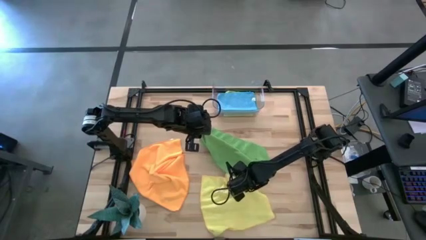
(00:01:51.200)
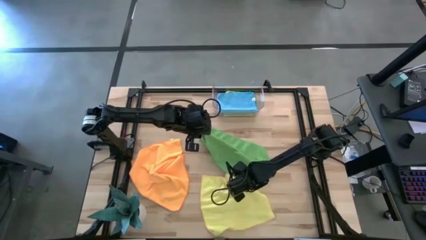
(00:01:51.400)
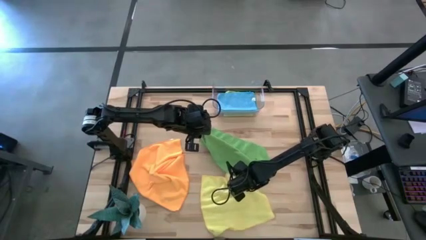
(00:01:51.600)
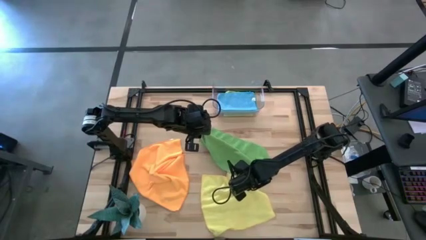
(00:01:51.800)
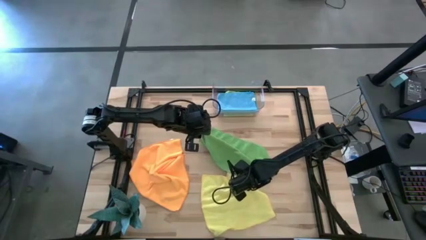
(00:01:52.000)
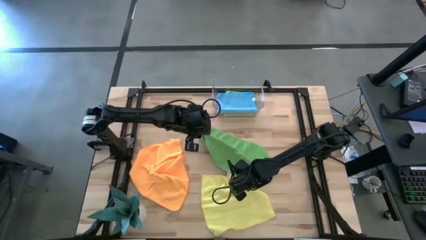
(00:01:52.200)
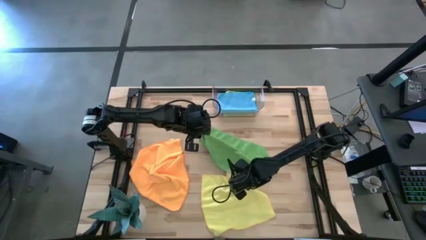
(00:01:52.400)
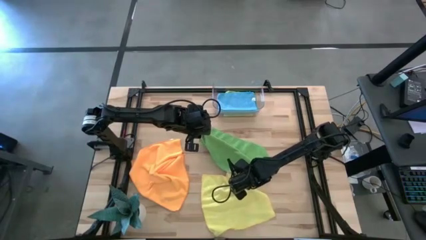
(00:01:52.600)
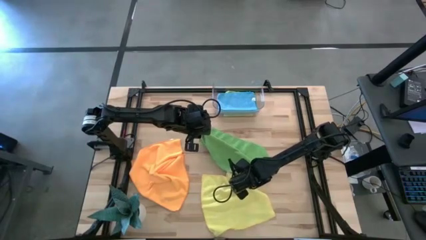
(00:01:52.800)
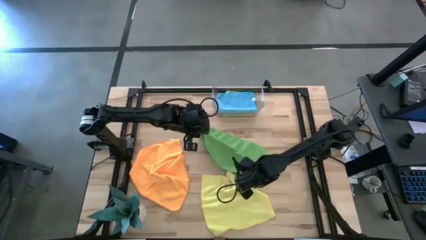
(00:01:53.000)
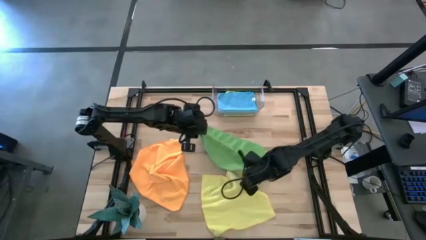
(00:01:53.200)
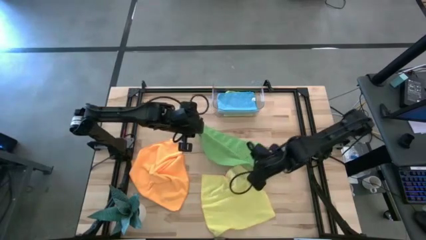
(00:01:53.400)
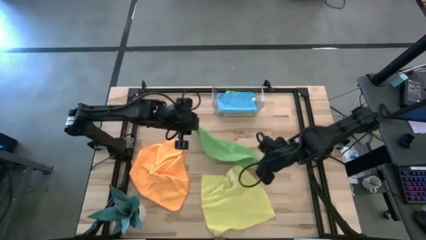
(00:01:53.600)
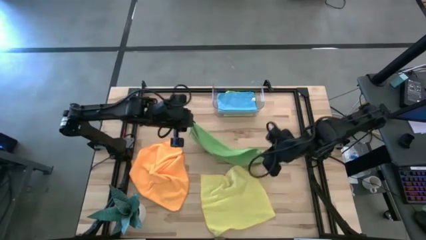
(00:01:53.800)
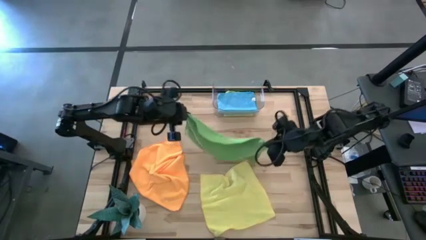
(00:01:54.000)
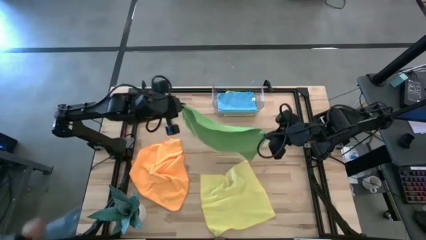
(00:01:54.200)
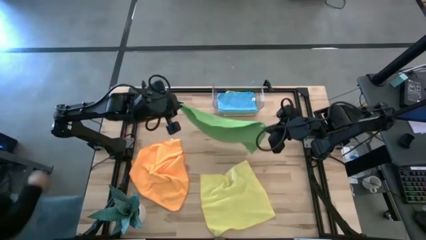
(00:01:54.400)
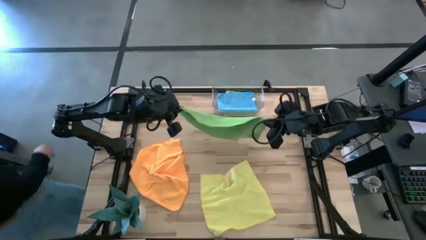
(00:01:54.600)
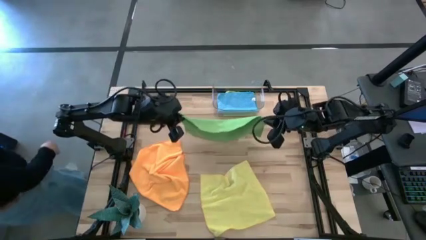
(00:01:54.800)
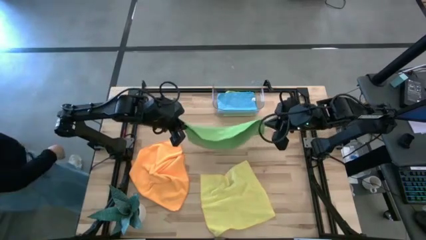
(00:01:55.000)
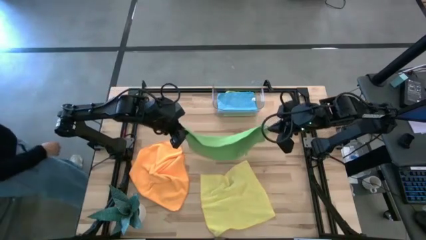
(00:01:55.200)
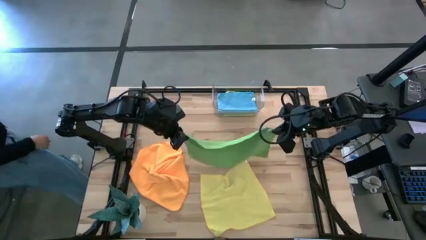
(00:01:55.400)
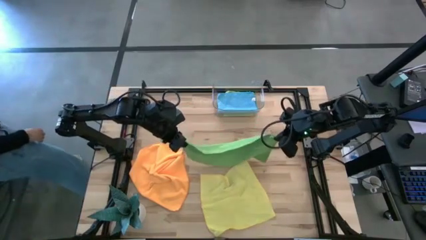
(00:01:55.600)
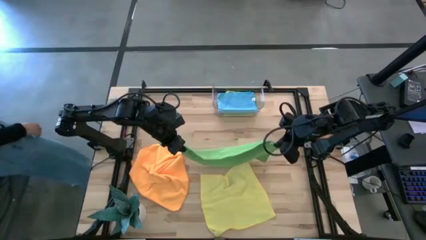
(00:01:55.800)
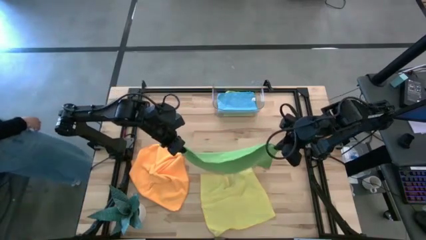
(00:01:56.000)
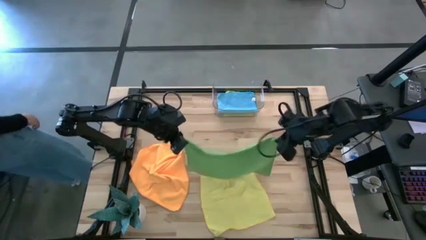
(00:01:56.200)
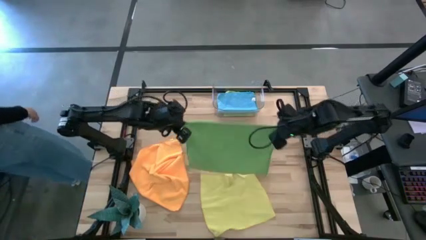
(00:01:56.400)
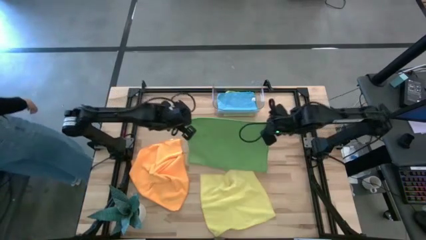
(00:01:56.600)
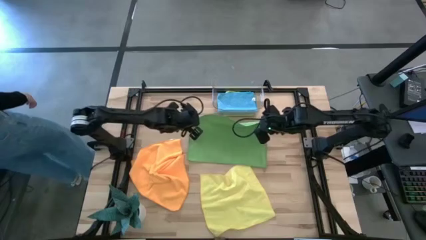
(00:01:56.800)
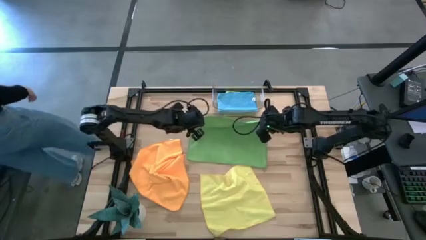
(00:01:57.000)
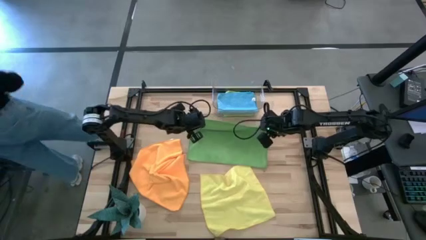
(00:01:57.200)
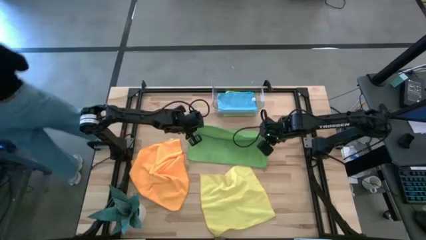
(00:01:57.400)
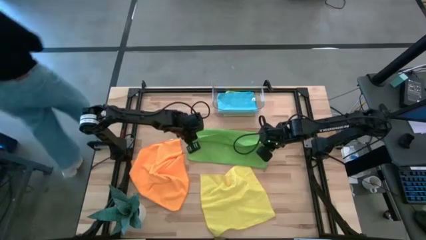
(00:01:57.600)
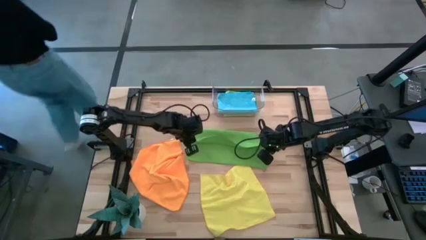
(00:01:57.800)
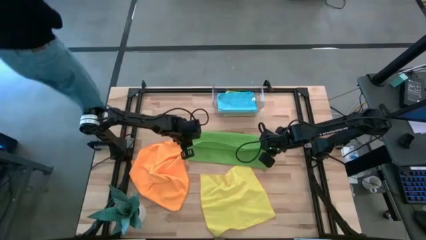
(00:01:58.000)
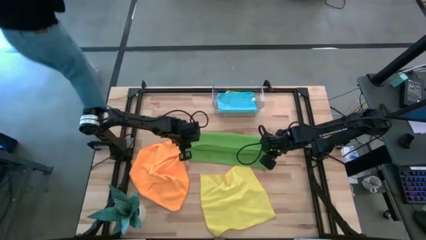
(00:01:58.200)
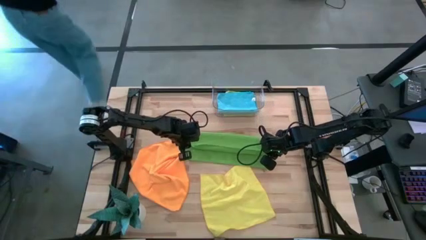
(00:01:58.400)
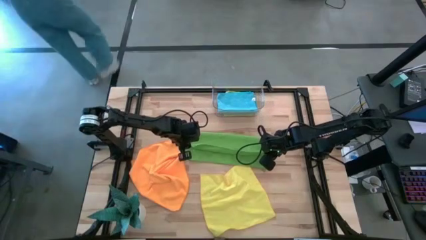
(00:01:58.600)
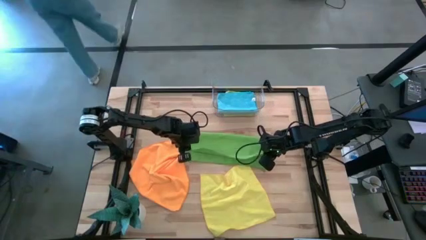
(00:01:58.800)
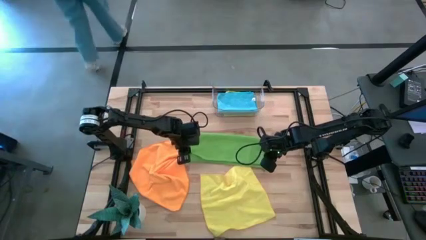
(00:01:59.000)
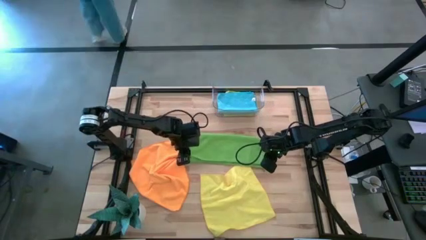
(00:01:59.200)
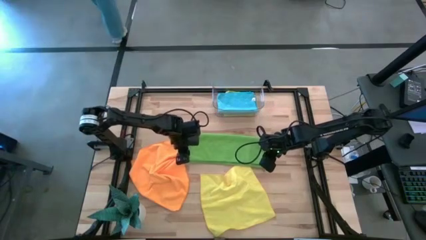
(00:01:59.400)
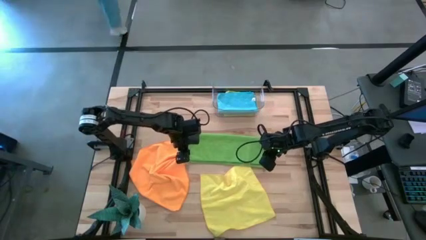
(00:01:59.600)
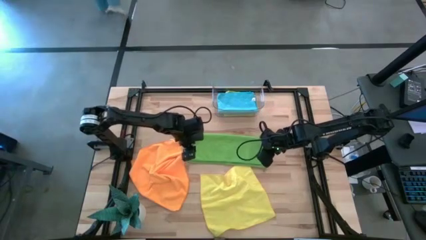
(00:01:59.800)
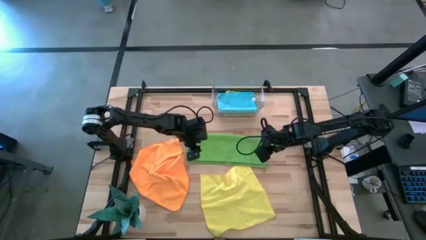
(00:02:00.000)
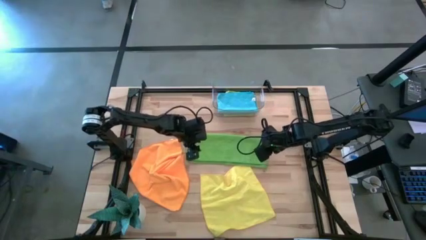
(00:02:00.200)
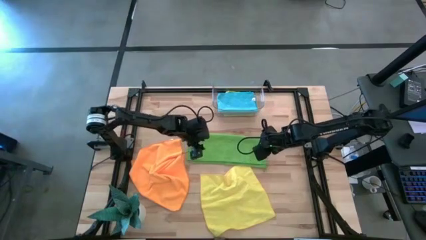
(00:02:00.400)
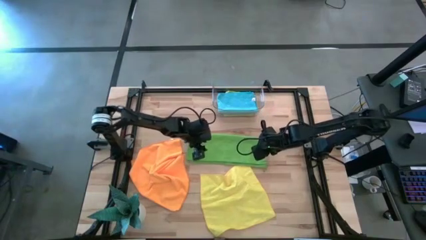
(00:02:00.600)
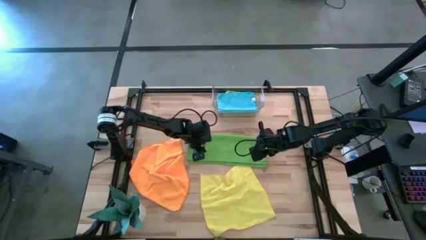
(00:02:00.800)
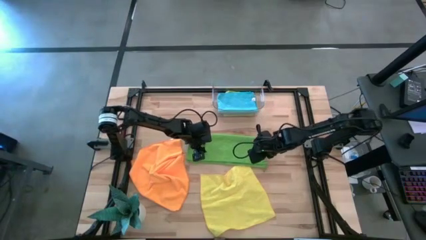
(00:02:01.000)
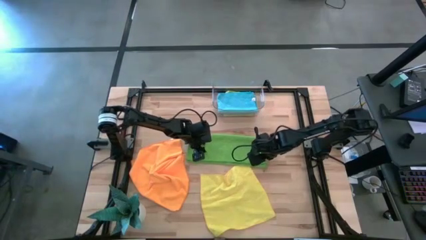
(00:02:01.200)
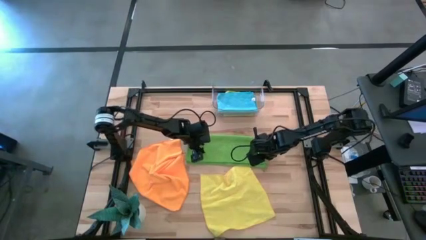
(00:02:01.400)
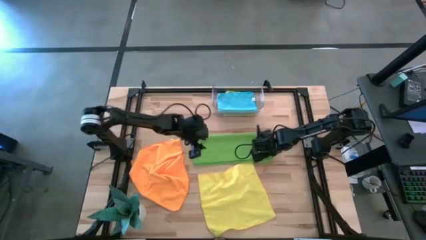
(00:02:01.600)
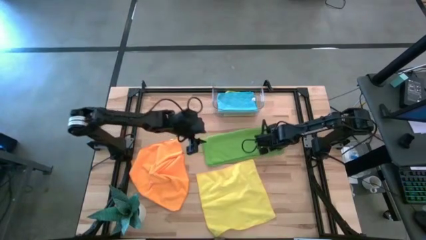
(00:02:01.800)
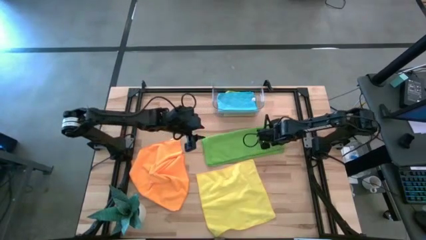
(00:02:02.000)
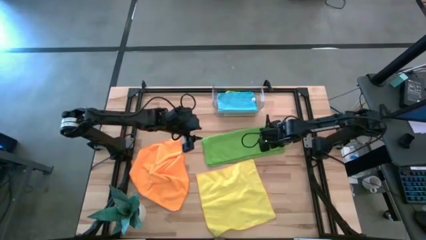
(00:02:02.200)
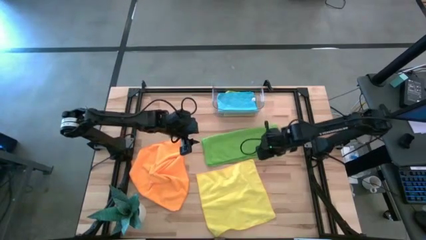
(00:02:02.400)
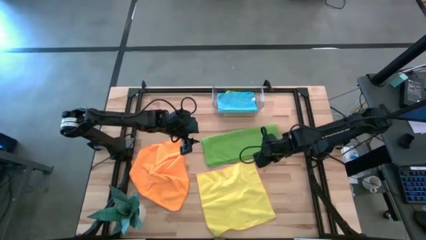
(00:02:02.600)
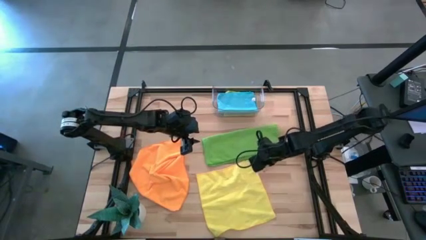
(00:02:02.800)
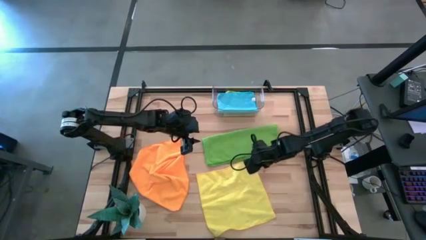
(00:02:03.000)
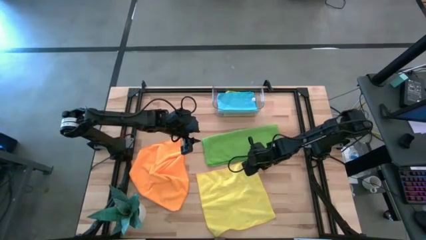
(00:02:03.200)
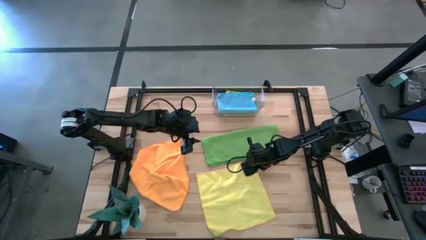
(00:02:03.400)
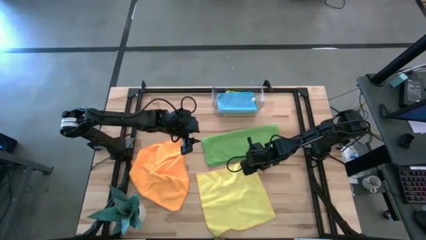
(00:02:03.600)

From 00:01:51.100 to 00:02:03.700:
Task: Fold microfiber towels
Fold the green microfiber cloth

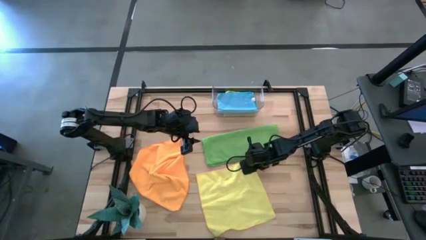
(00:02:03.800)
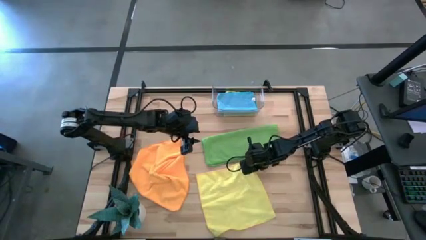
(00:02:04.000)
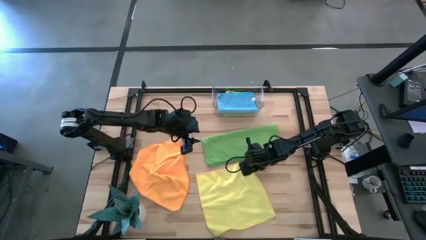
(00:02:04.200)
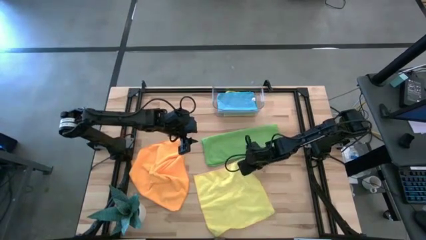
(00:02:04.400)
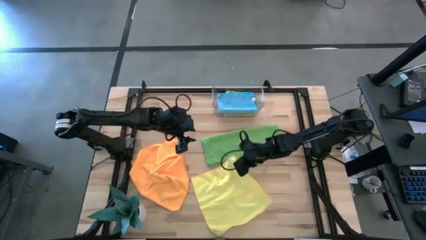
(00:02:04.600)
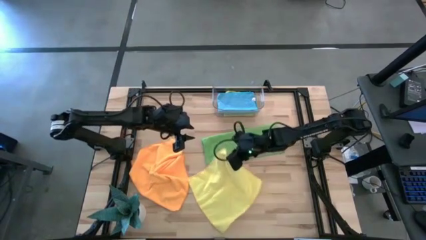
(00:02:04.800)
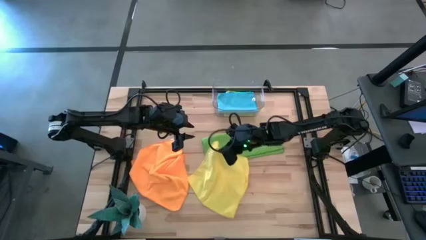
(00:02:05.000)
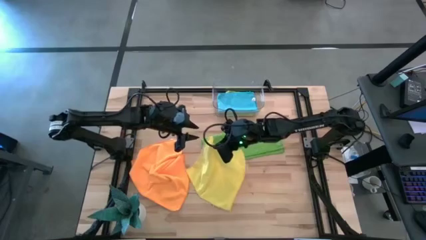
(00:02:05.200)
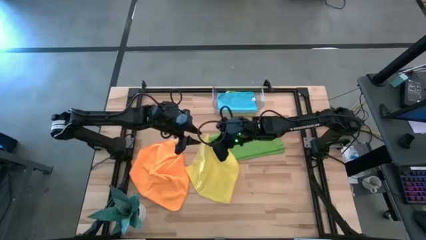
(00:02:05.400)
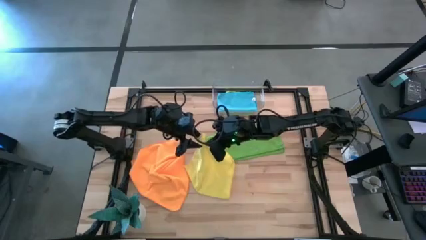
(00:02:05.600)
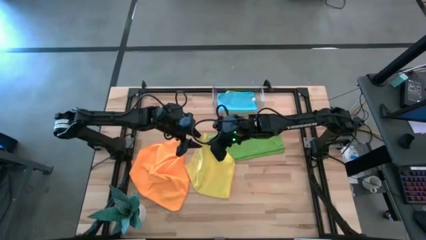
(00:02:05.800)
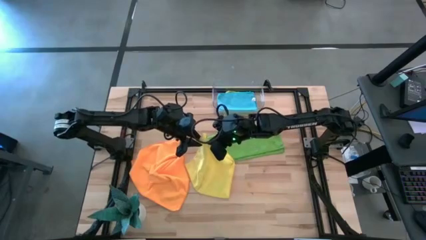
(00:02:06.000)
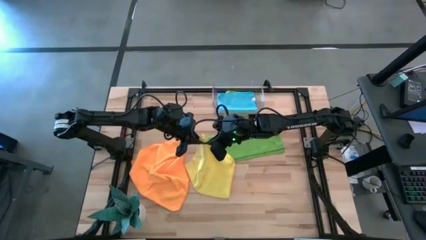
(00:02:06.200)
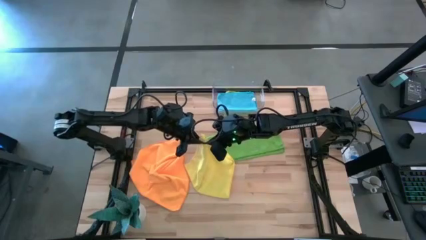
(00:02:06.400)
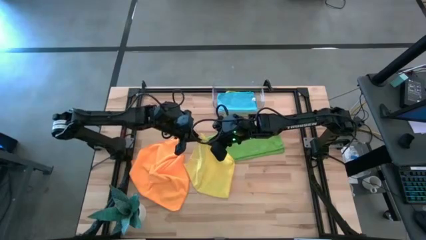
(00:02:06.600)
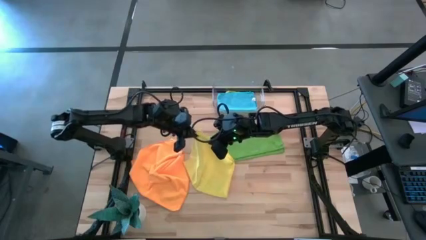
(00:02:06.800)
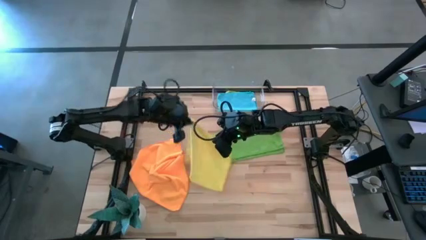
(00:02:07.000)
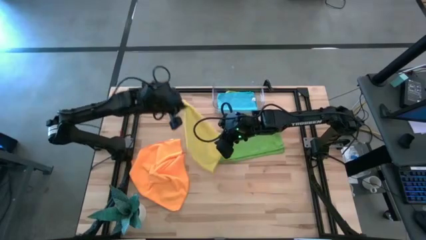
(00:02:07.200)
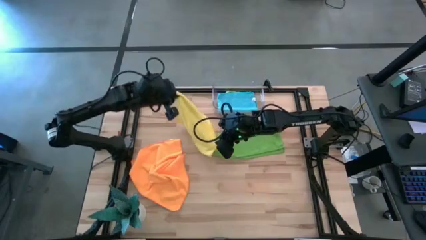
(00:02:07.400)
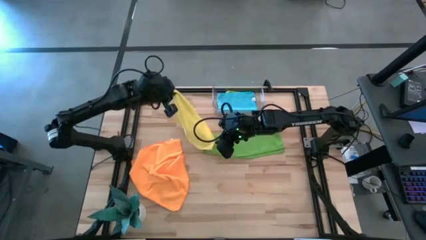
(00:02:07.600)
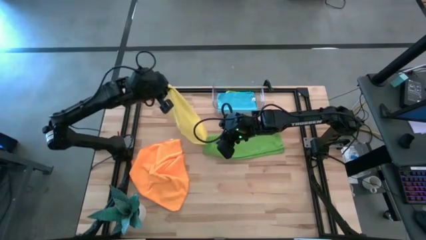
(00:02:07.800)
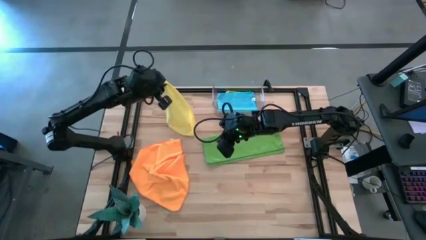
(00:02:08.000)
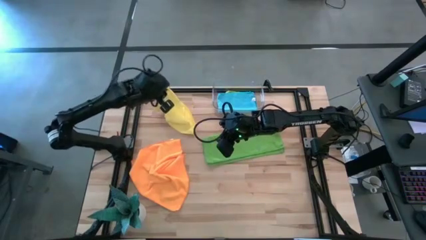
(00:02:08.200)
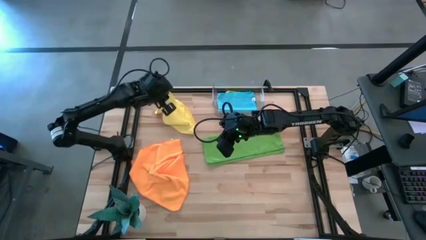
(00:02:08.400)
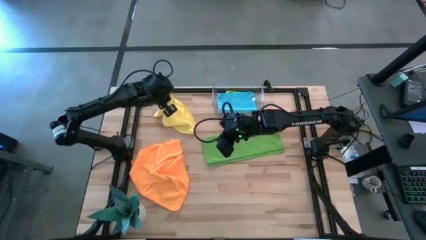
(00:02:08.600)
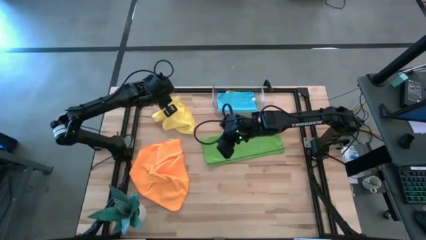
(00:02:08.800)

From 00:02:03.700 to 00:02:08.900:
Move the yellow microfiber cloth to the top left of the table
